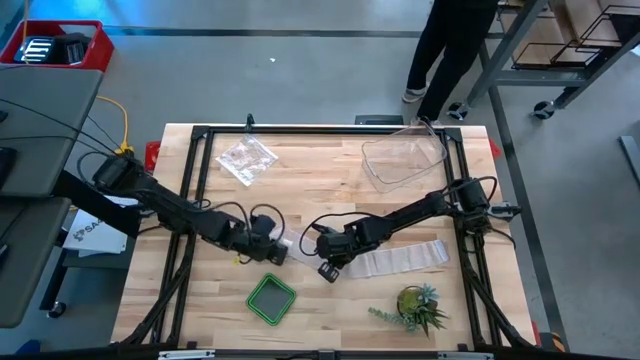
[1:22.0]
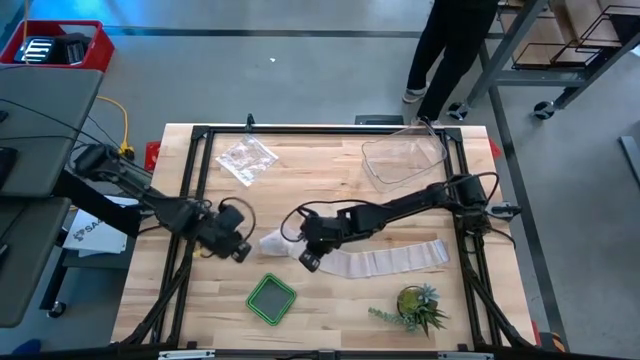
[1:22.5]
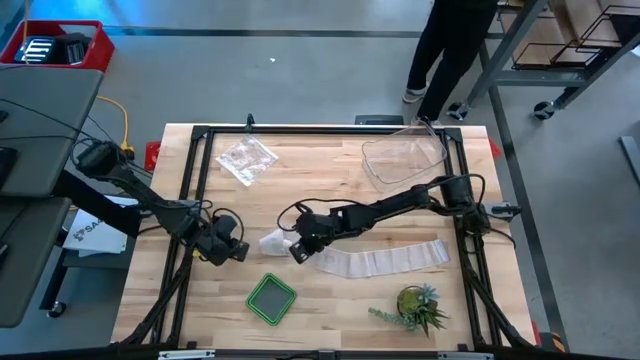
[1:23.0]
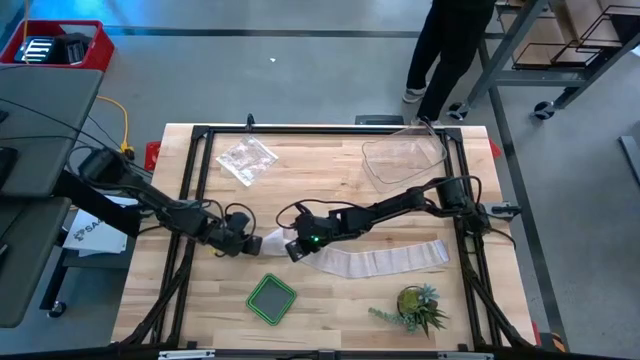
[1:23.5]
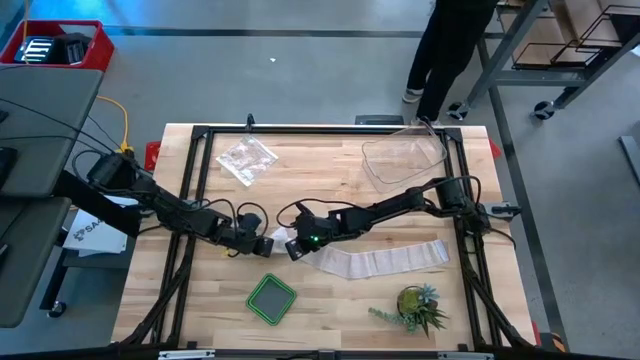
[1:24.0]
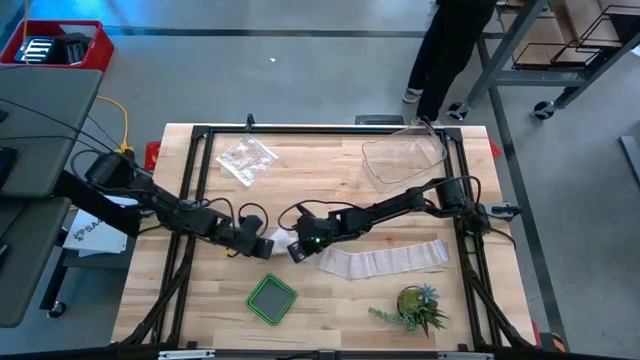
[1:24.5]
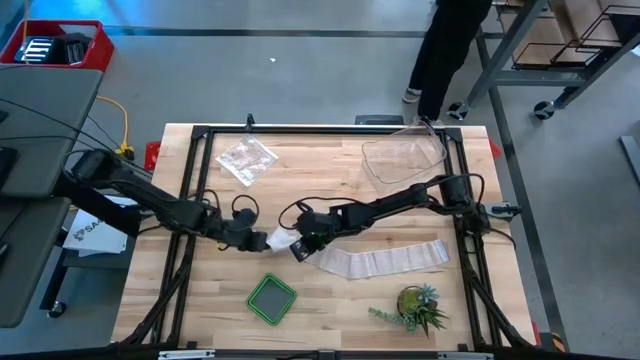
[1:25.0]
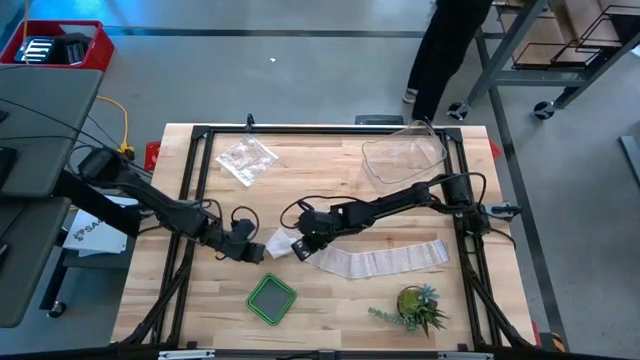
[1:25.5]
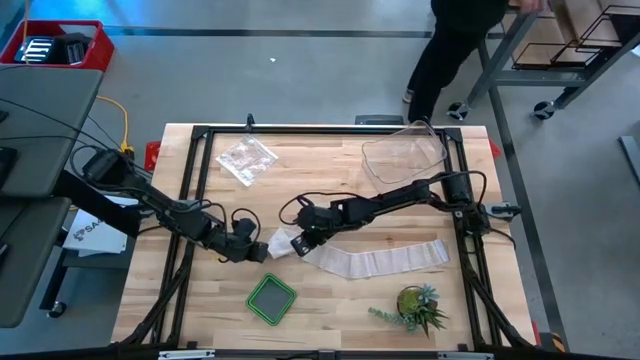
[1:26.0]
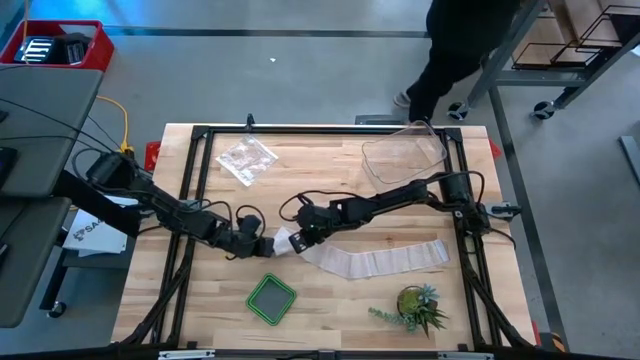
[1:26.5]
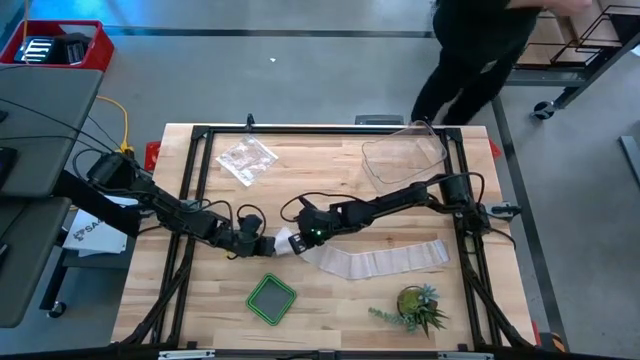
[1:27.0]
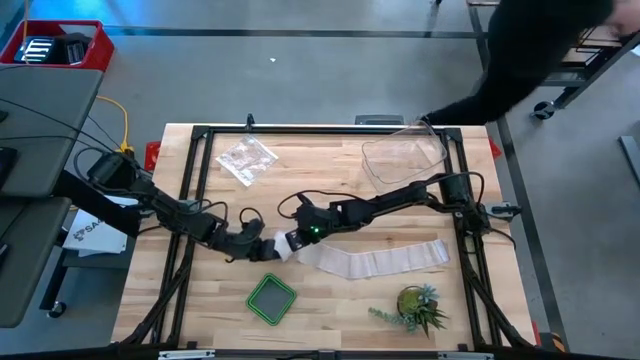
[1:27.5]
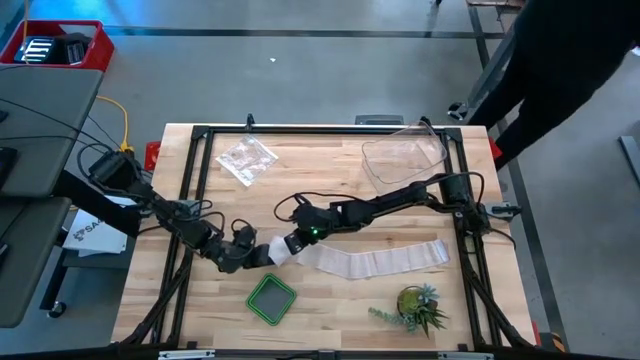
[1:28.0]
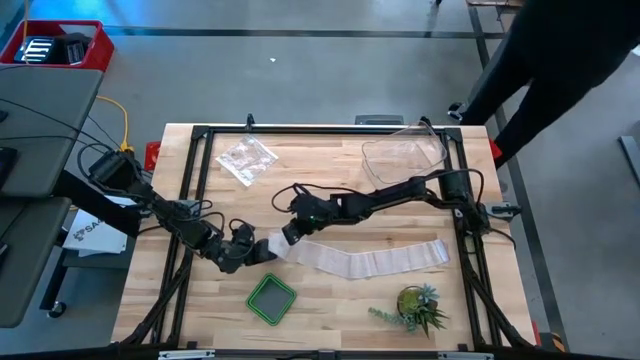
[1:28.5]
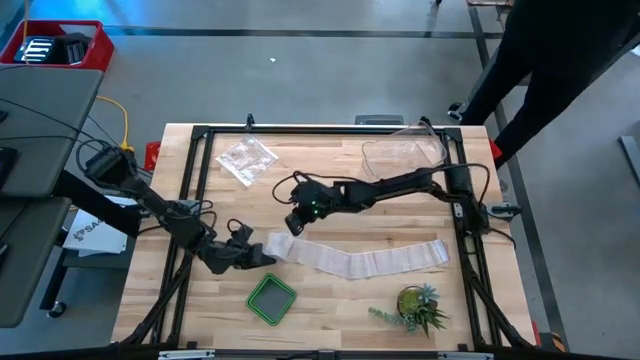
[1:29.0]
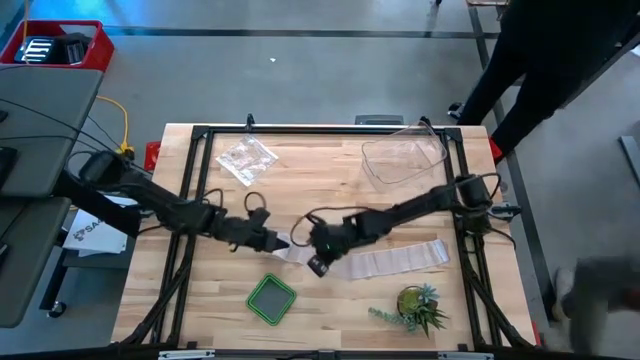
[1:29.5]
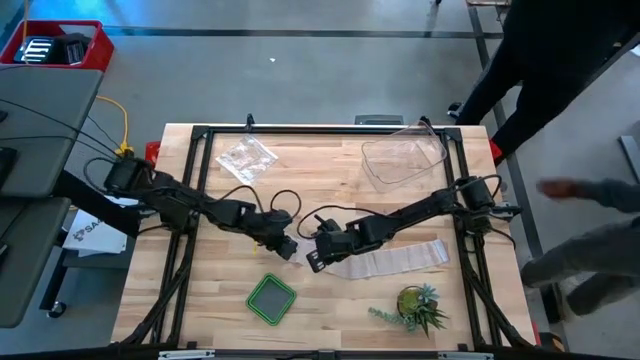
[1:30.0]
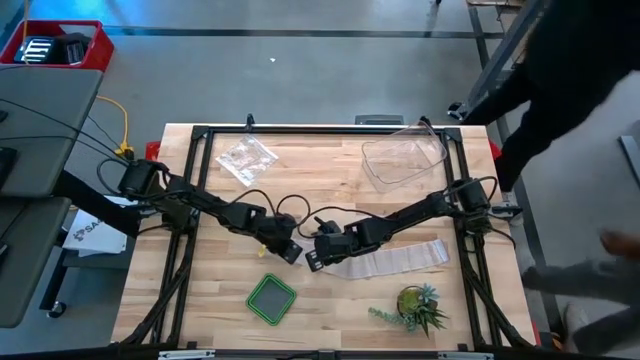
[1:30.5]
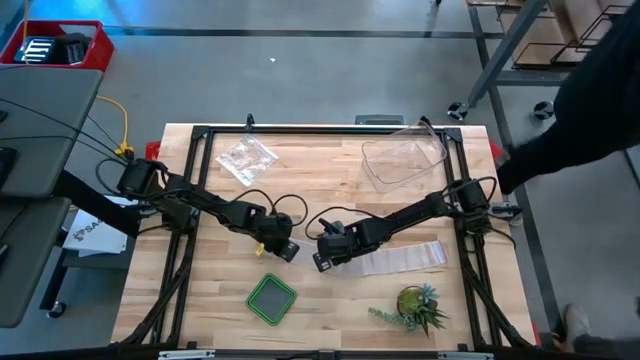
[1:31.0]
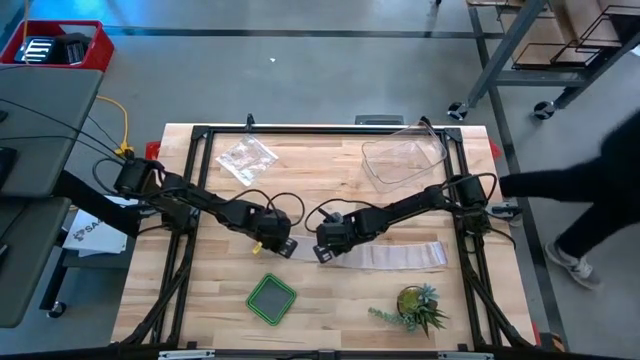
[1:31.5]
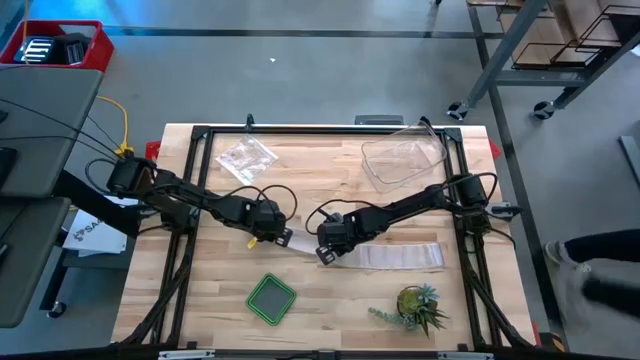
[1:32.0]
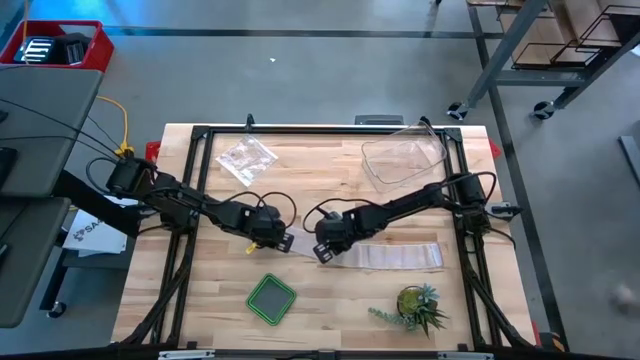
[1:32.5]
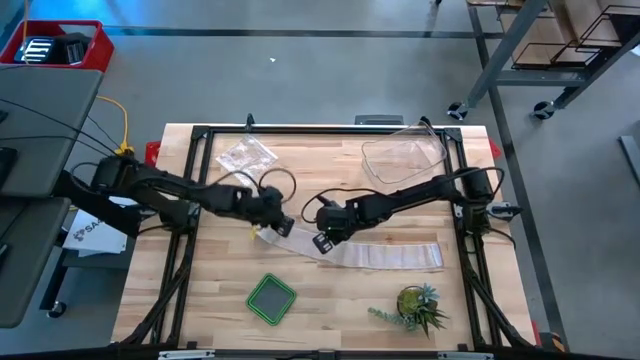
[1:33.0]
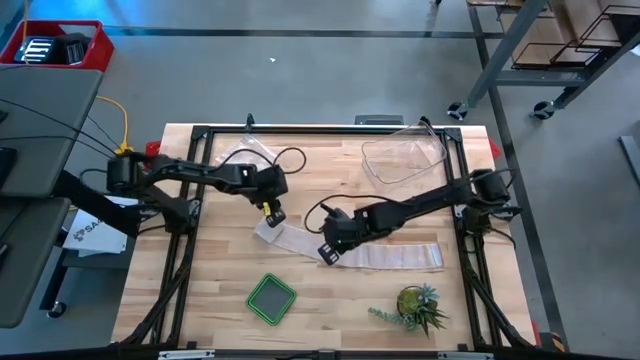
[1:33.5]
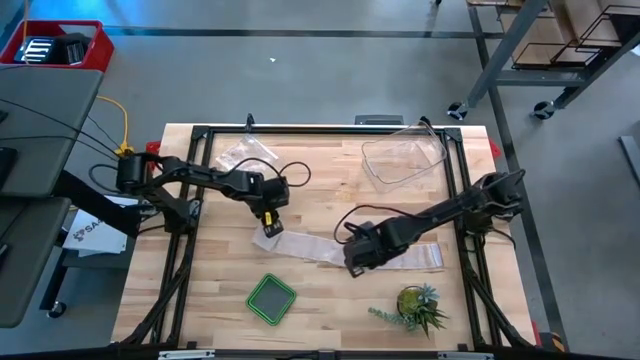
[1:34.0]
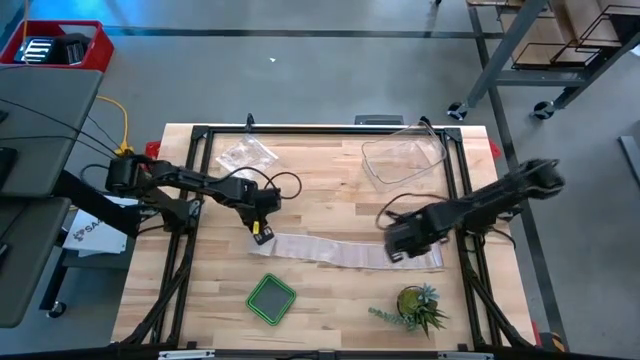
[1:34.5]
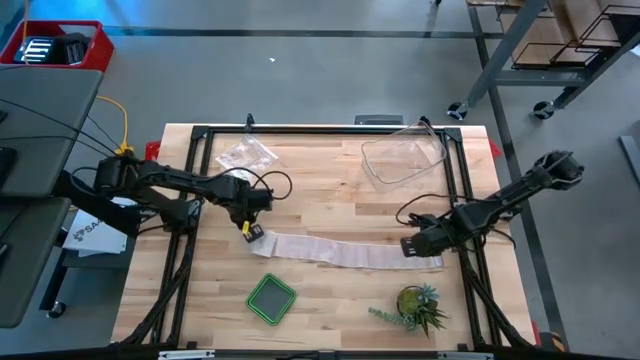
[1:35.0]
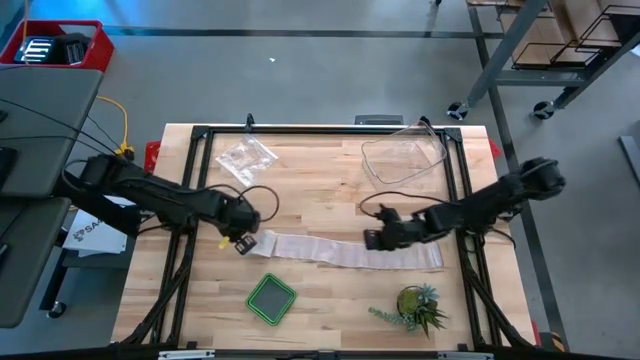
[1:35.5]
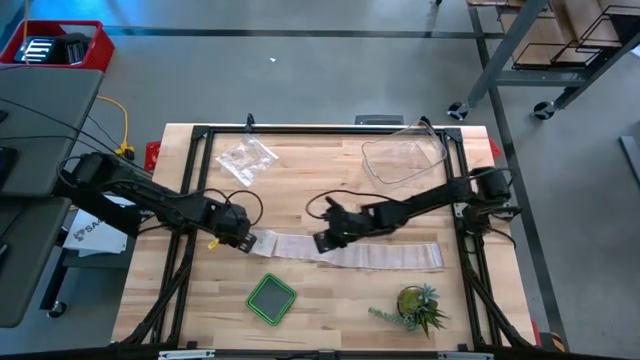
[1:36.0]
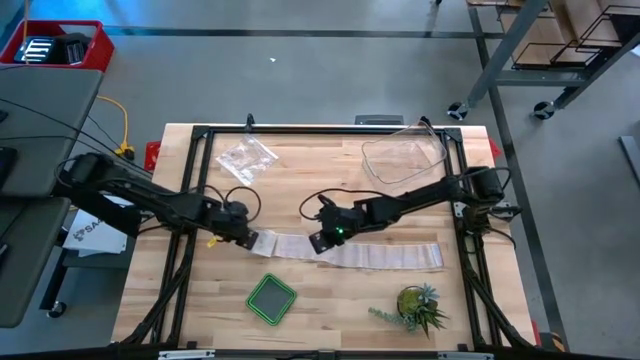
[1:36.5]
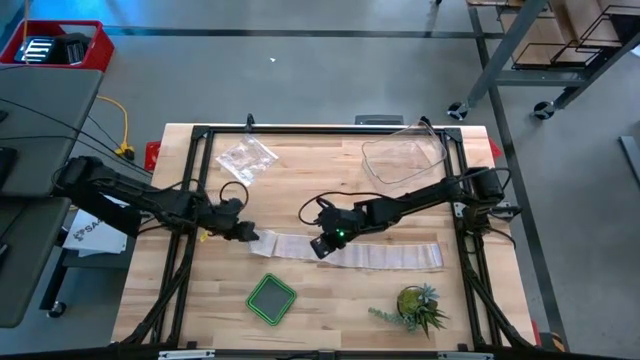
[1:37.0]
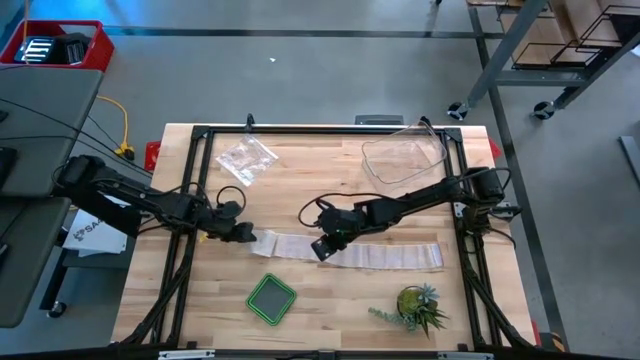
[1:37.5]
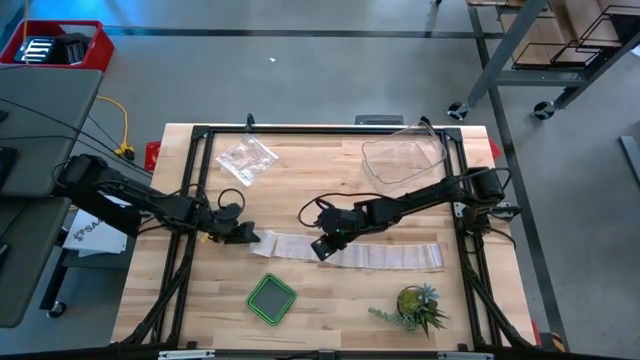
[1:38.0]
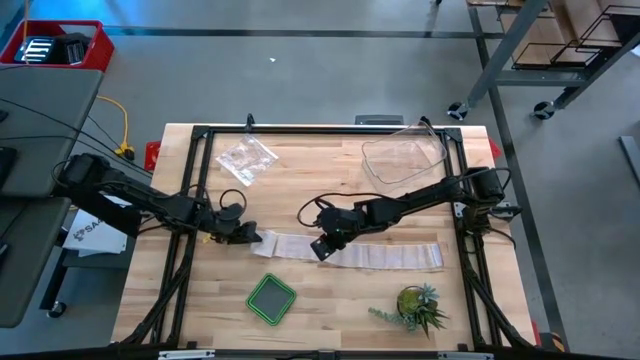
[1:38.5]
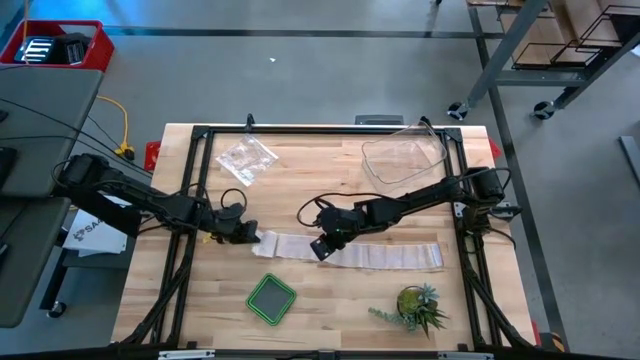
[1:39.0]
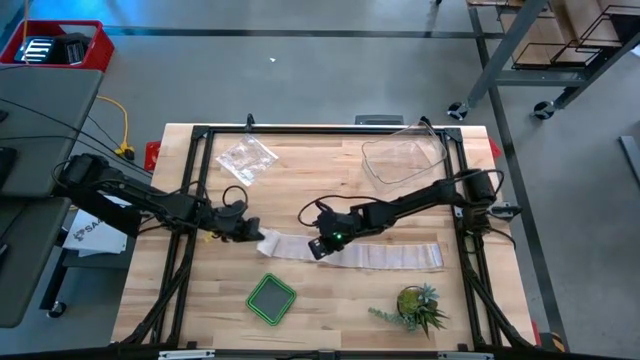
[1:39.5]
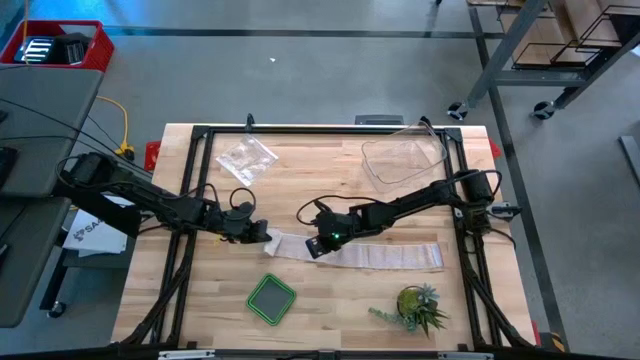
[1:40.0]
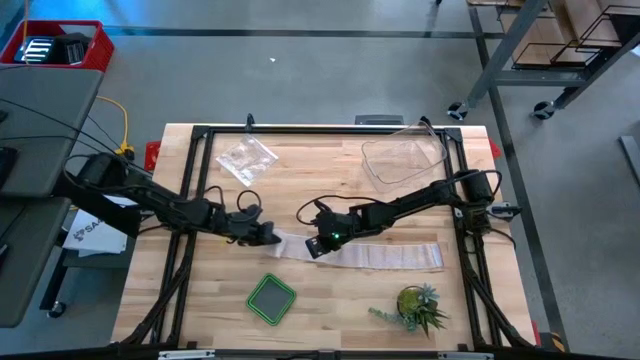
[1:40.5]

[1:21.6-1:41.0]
Task: Roll bandage
Roll the white bandage

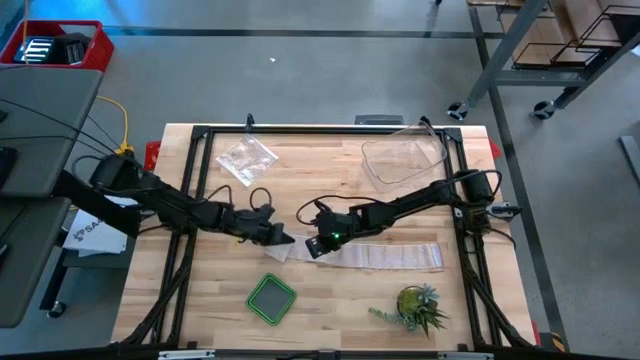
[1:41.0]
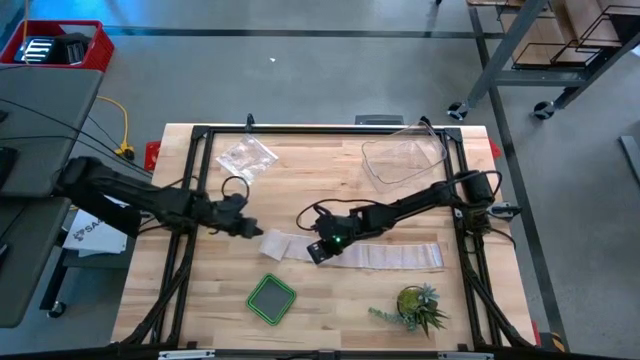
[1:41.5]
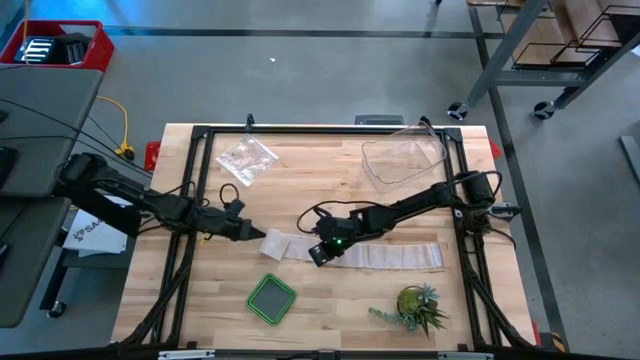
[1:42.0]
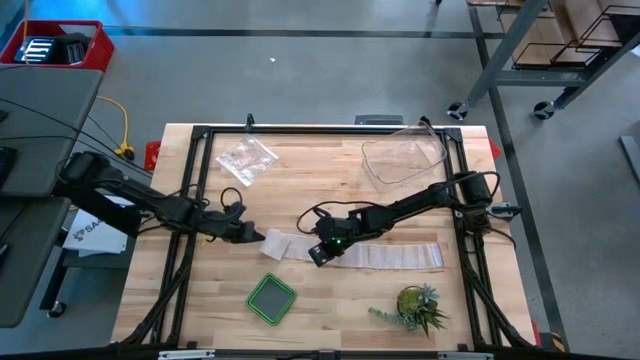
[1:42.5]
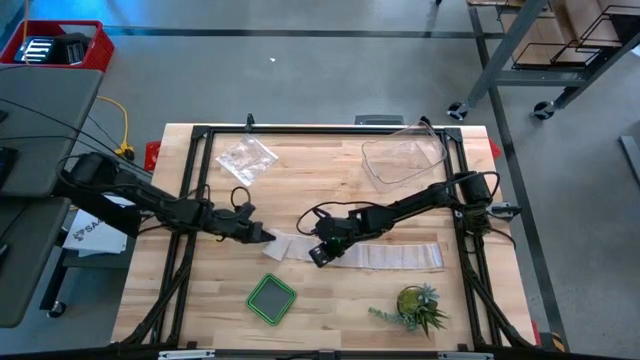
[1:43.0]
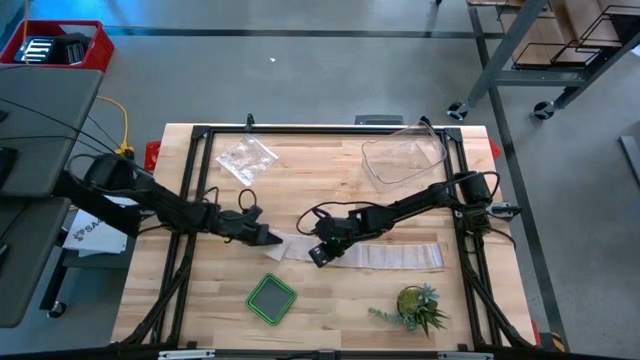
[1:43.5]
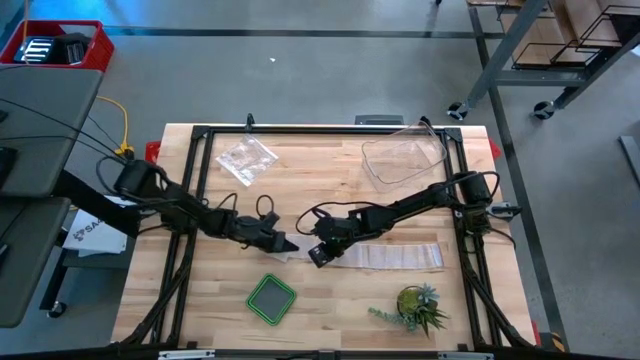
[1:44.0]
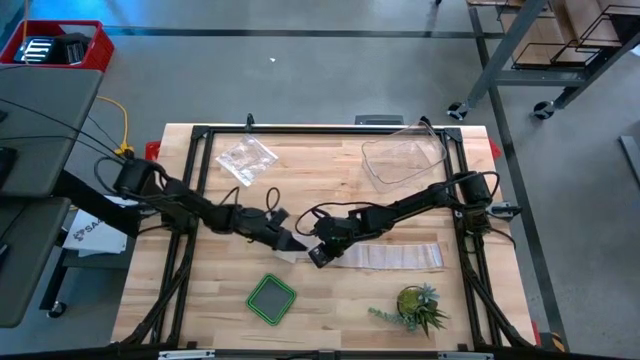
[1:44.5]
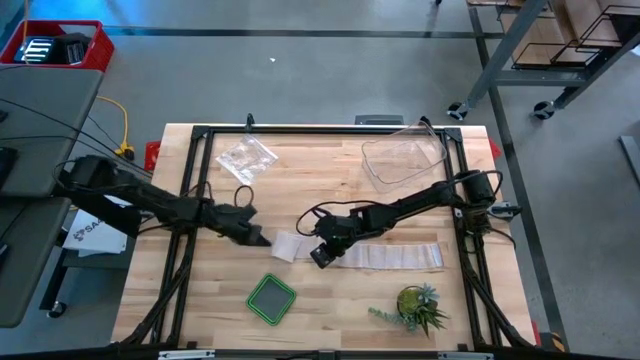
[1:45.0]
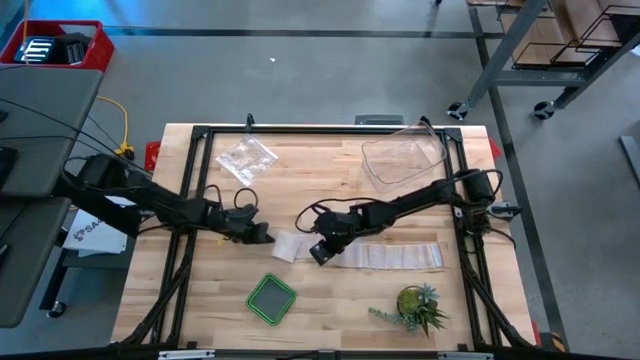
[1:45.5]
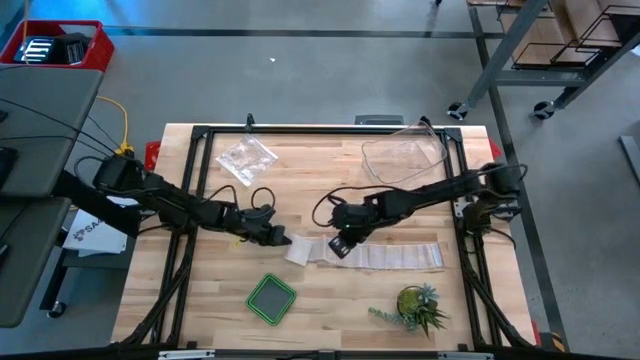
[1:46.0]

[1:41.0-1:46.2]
Roll the white bandage
